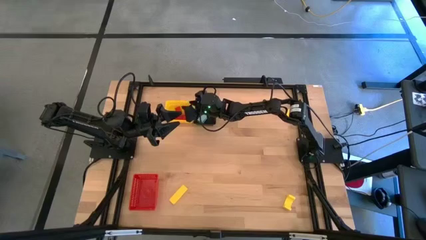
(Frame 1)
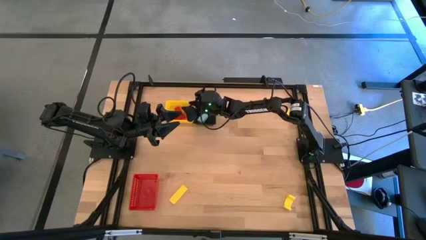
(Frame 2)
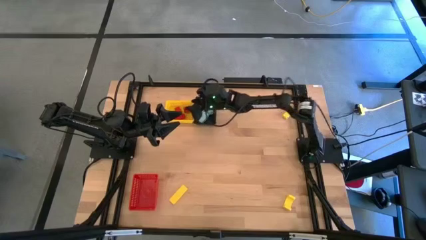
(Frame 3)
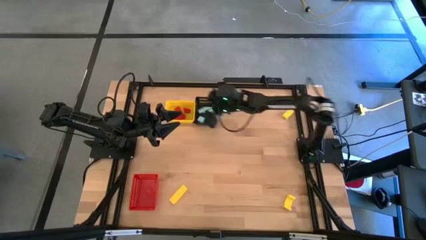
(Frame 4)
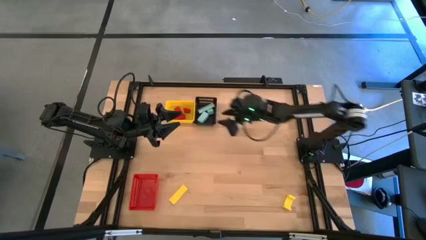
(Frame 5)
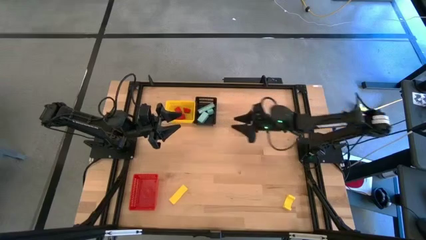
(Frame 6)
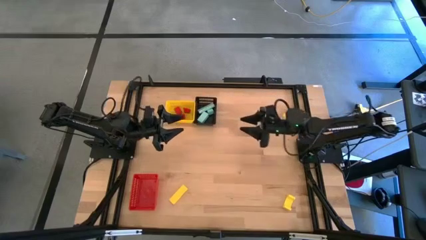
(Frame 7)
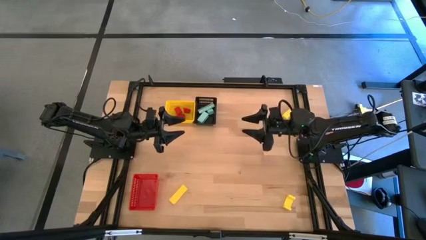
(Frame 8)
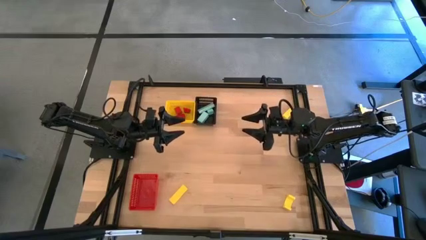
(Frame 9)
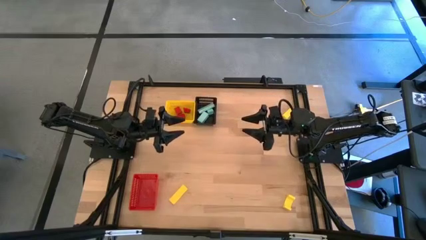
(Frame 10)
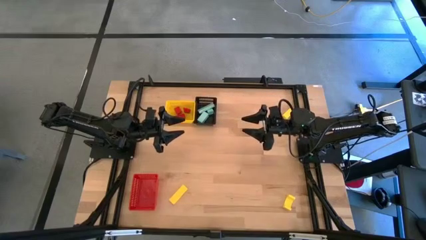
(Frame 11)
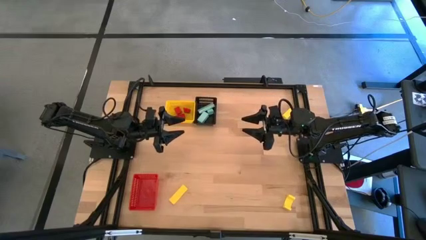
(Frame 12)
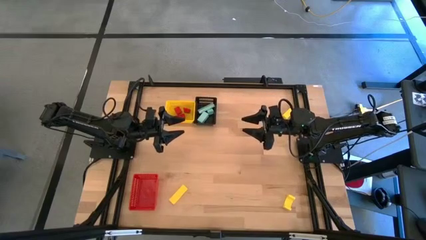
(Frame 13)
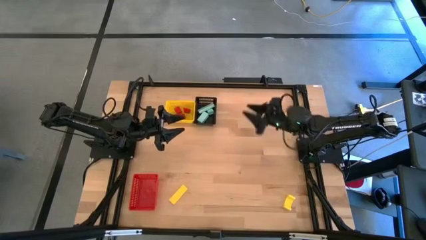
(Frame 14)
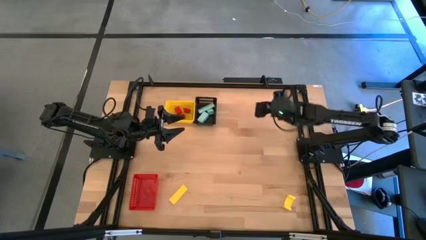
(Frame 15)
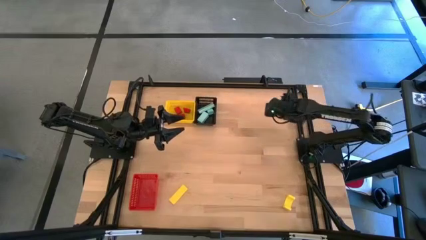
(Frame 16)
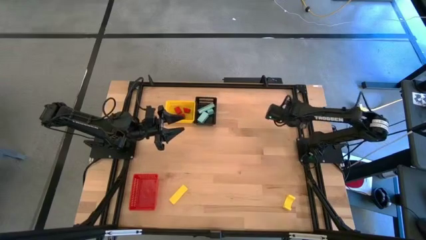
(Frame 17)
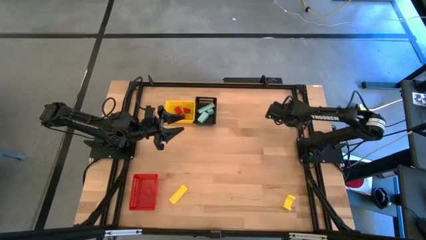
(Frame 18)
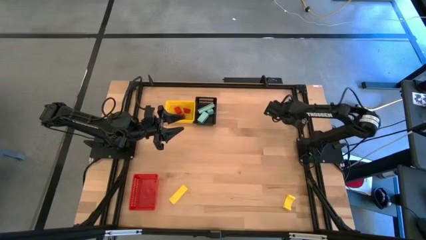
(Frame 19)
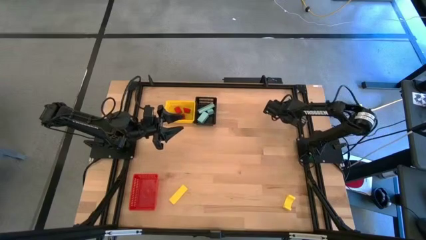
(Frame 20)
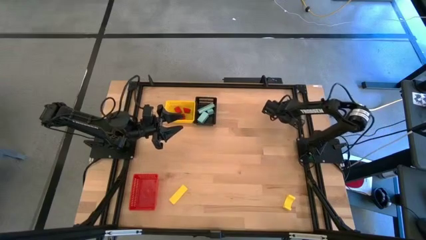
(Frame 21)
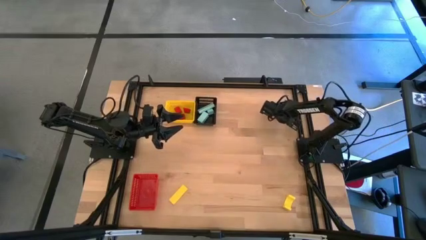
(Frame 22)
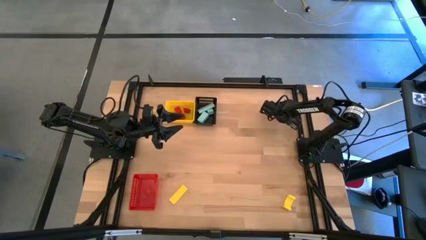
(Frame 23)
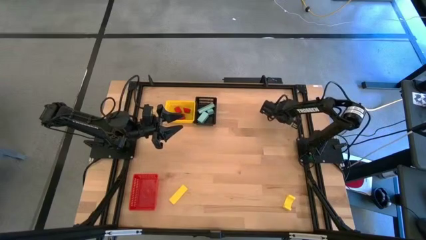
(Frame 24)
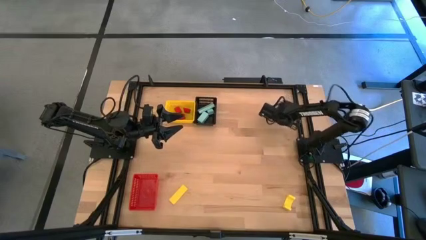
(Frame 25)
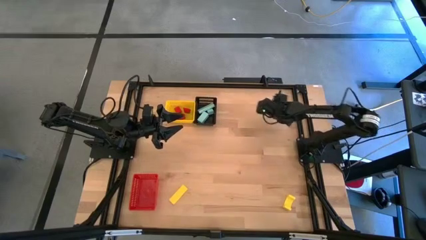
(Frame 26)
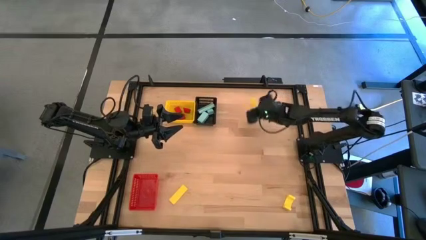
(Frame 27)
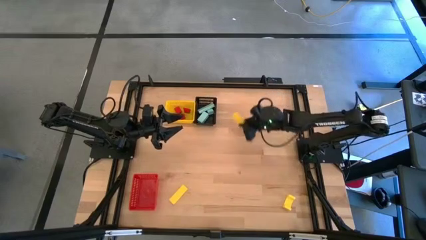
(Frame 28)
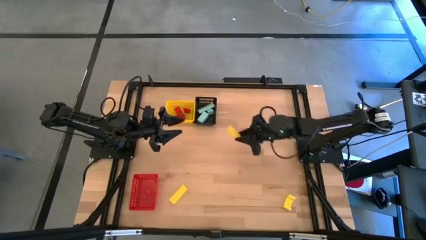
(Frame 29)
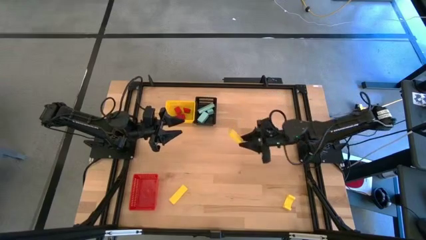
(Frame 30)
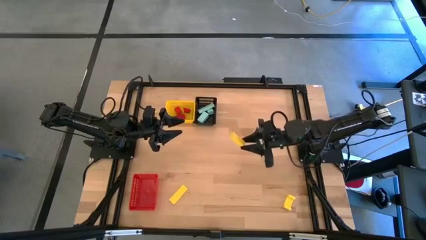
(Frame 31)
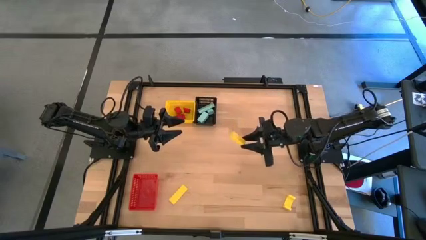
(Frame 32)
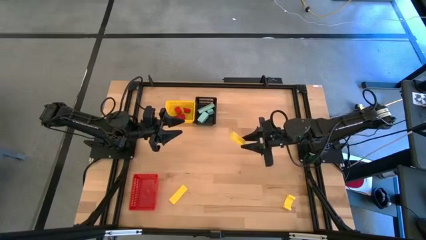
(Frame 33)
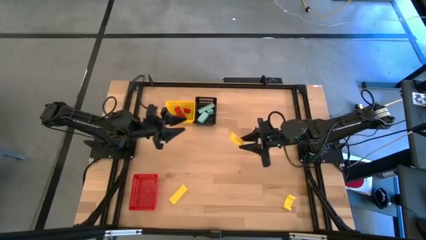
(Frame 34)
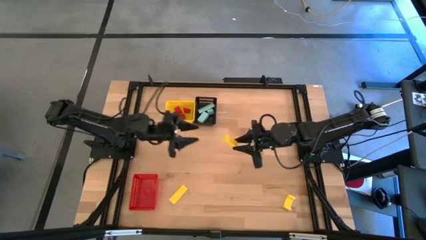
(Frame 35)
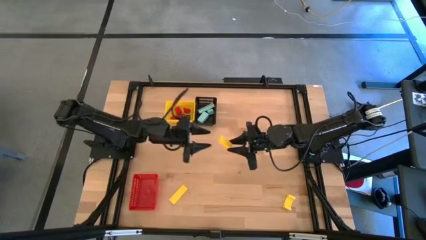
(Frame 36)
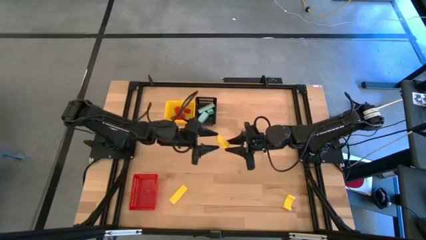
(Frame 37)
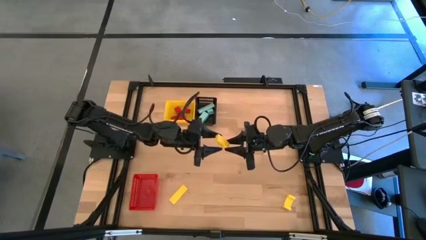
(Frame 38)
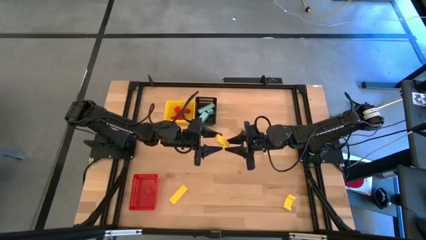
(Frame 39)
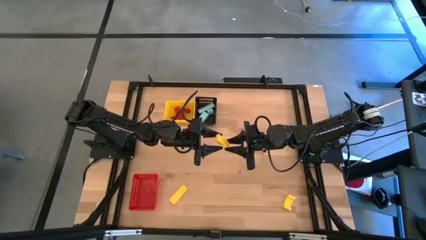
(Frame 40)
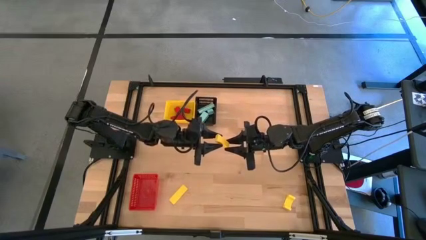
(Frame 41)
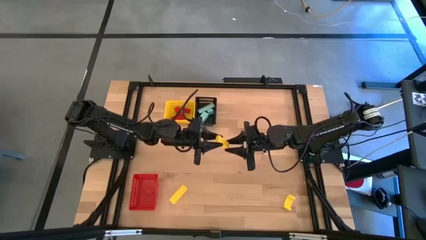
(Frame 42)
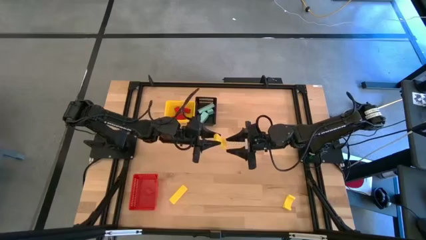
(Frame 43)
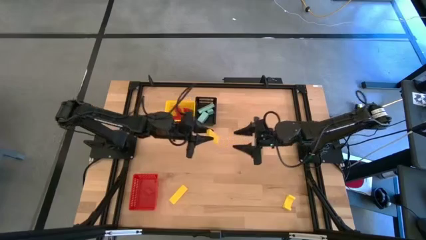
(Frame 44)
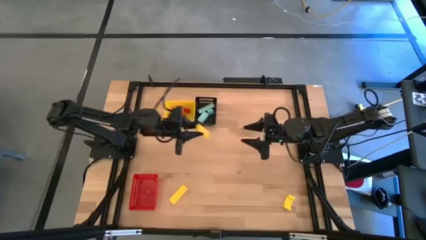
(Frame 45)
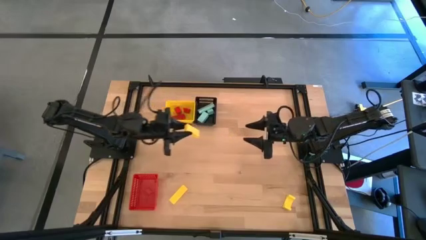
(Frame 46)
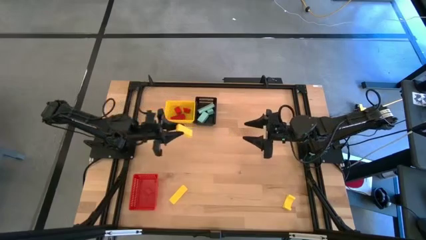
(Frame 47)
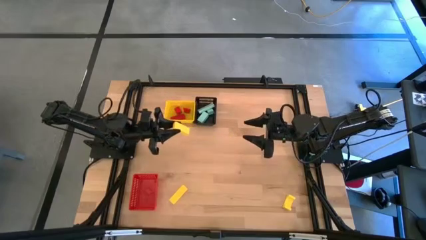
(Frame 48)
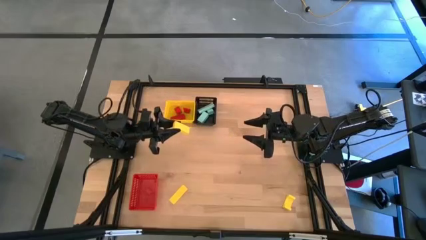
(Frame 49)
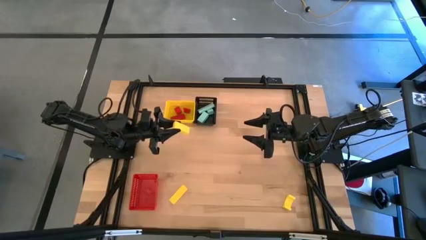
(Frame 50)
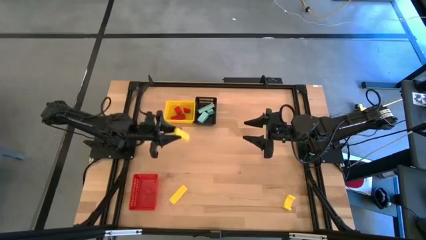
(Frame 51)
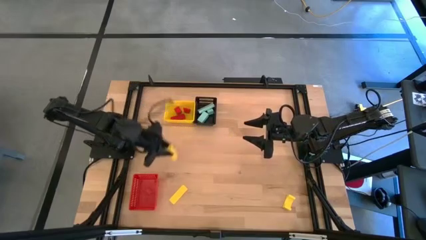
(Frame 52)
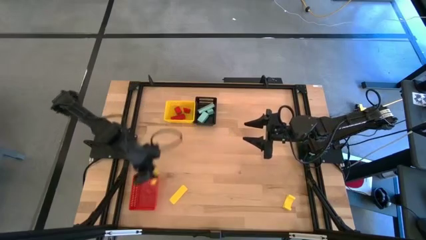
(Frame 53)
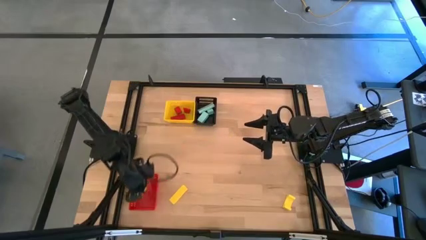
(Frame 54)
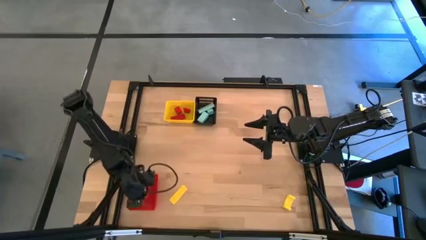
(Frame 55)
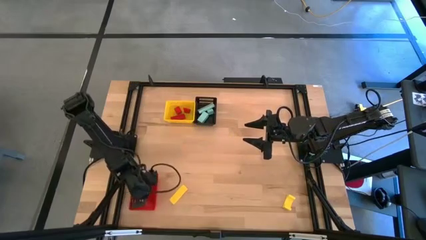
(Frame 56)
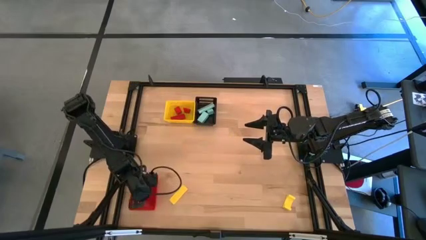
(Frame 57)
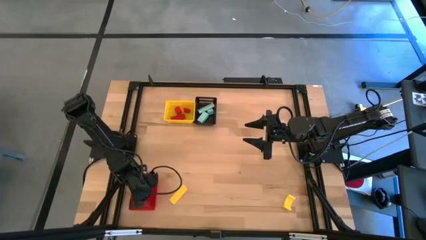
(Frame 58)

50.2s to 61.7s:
Task: Sort & place blocks by color
Put the top yellow block into the red basket

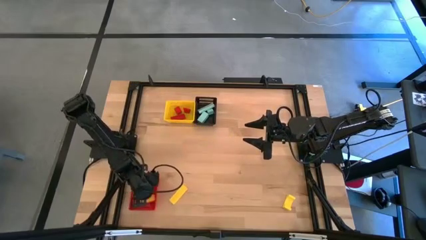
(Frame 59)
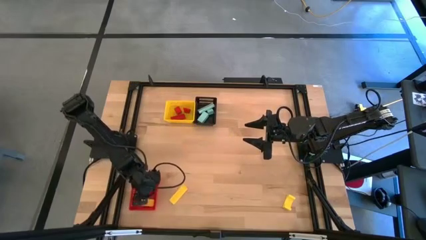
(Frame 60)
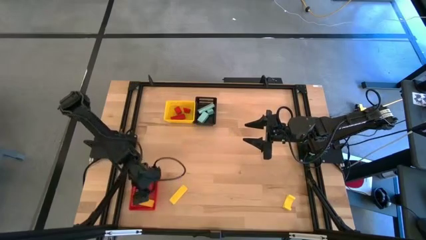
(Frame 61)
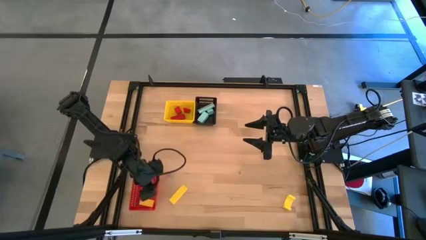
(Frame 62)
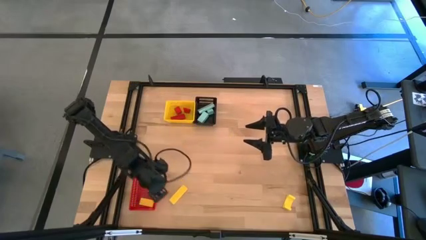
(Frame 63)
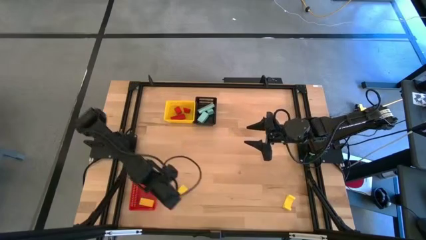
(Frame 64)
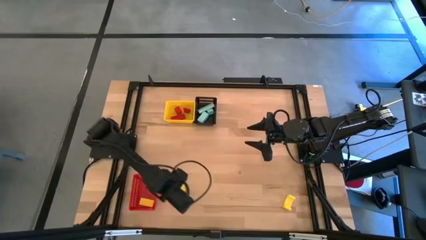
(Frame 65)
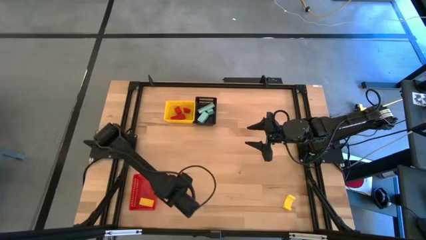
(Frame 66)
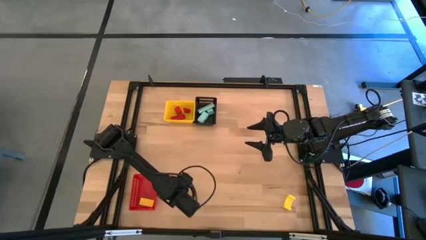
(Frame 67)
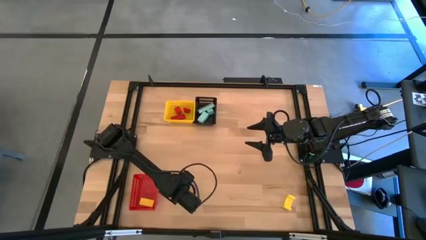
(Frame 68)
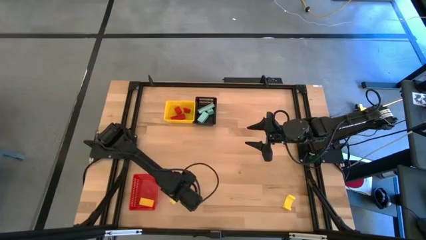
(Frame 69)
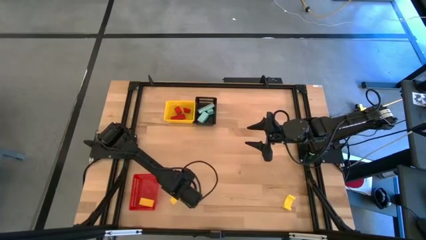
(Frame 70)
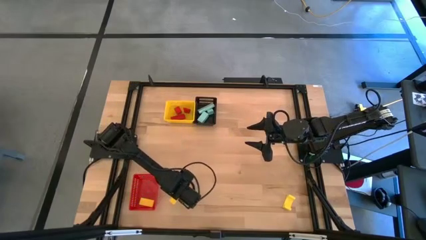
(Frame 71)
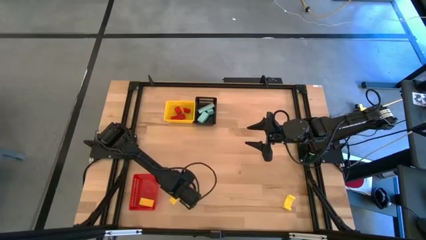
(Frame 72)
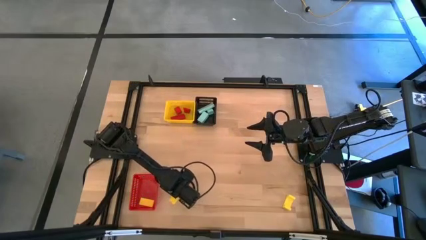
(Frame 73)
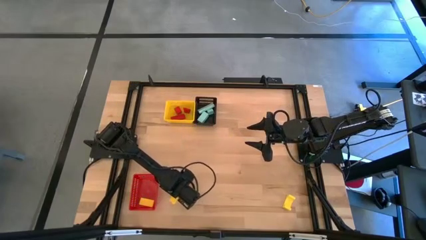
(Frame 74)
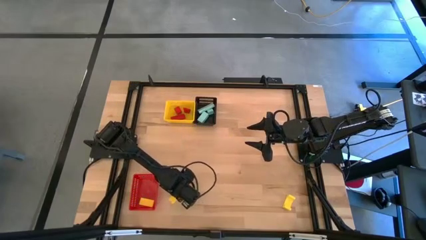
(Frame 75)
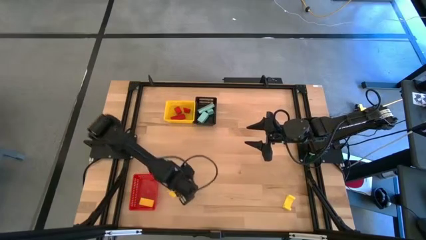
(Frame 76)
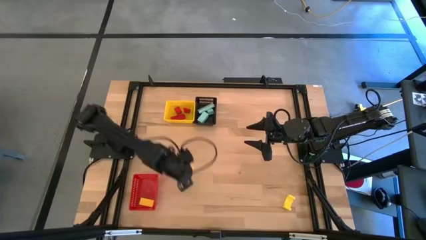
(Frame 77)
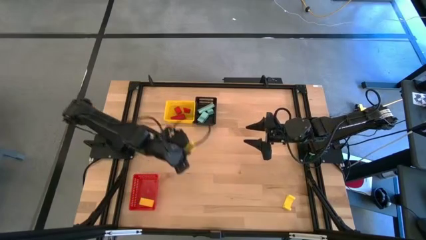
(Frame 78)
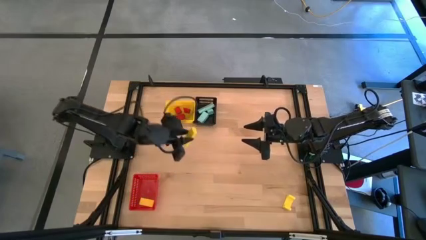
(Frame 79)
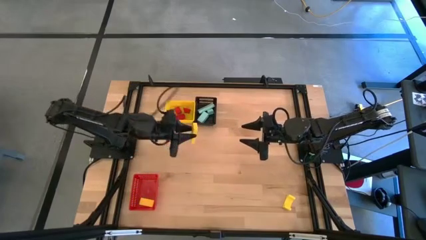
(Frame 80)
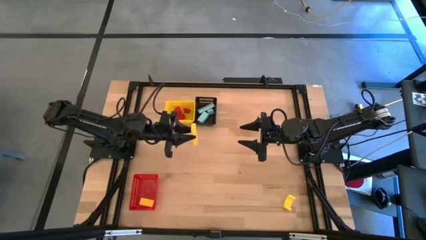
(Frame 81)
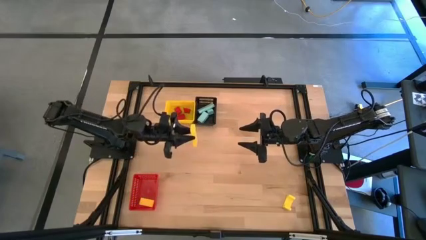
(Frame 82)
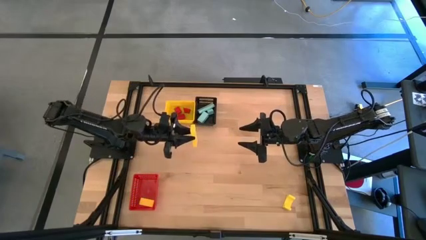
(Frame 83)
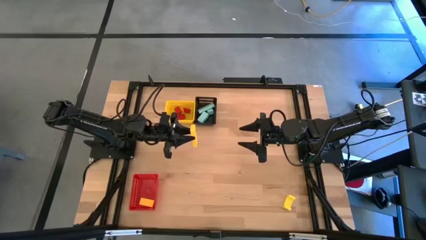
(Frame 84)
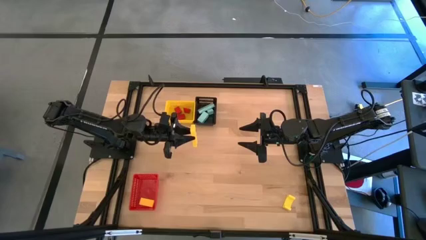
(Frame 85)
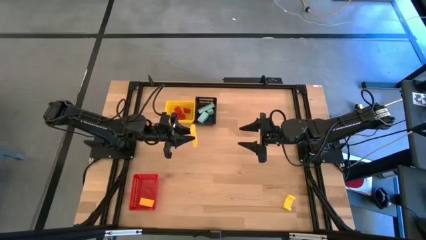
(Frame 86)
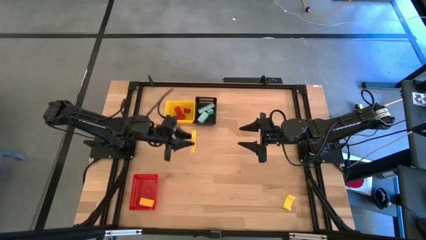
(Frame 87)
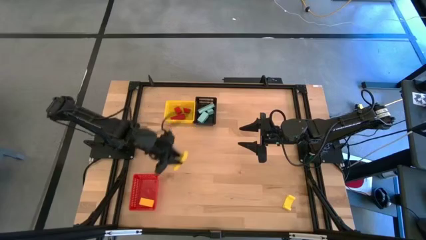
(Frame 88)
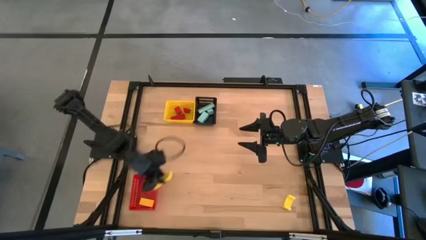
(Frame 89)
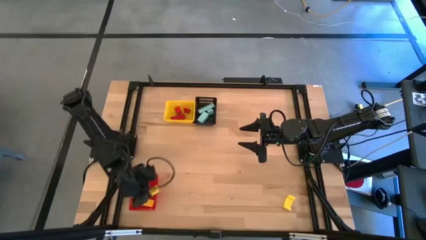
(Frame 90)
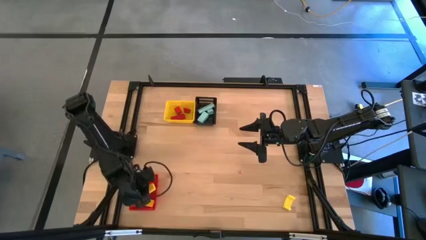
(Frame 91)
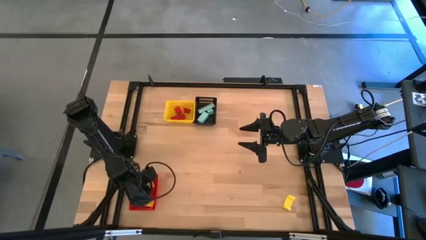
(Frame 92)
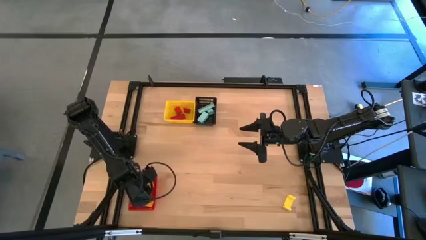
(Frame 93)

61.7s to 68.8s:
Put the left yellow block into the red basket
